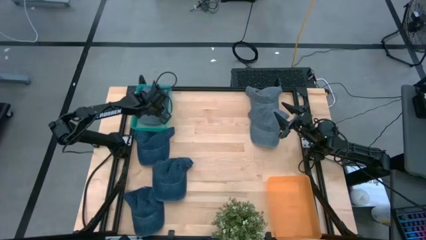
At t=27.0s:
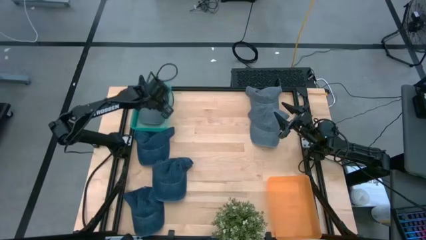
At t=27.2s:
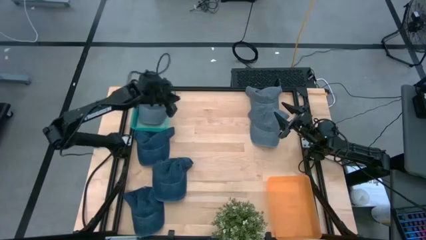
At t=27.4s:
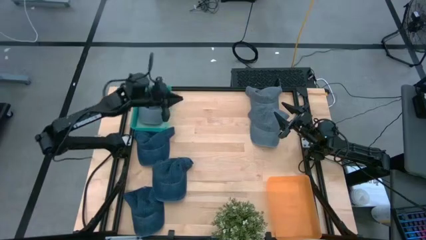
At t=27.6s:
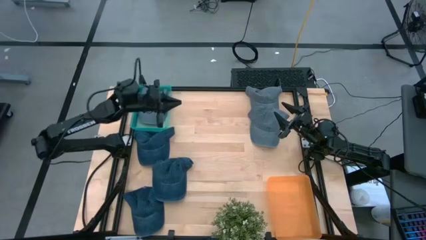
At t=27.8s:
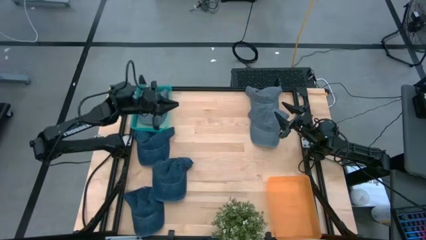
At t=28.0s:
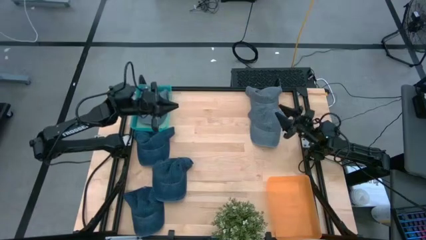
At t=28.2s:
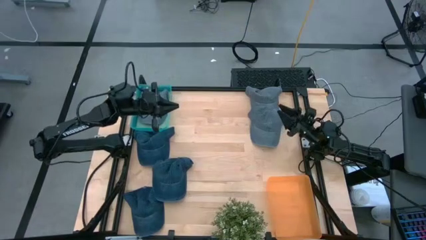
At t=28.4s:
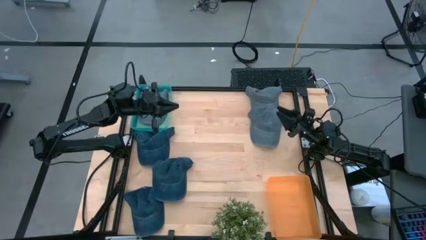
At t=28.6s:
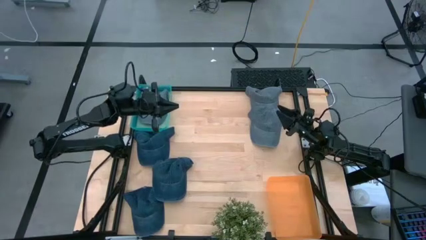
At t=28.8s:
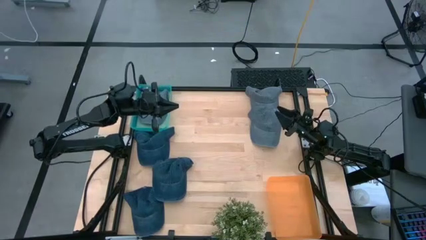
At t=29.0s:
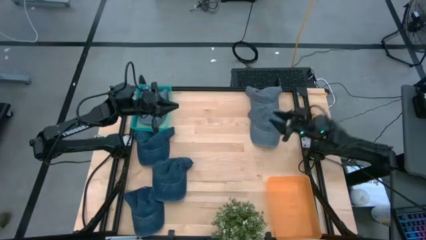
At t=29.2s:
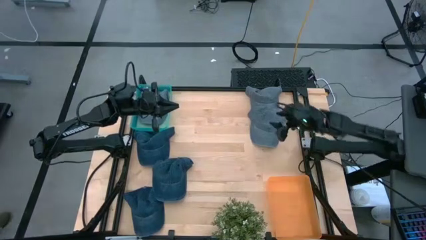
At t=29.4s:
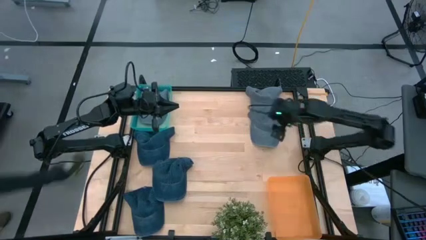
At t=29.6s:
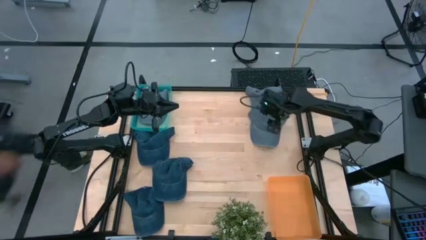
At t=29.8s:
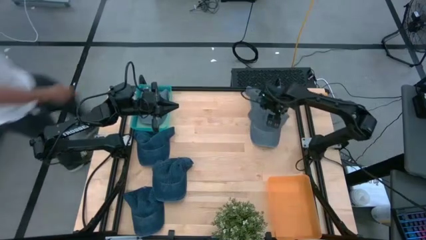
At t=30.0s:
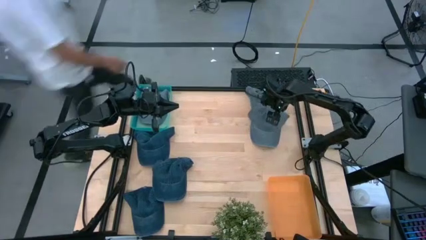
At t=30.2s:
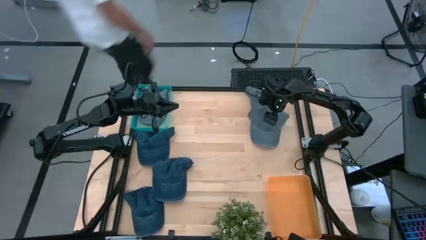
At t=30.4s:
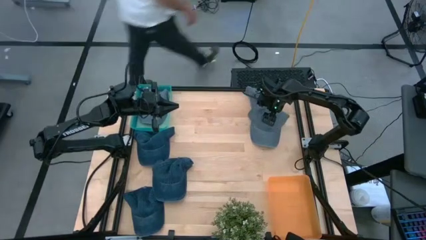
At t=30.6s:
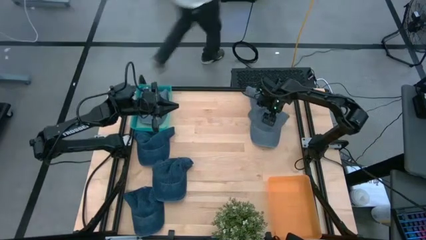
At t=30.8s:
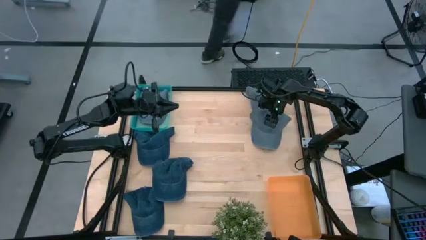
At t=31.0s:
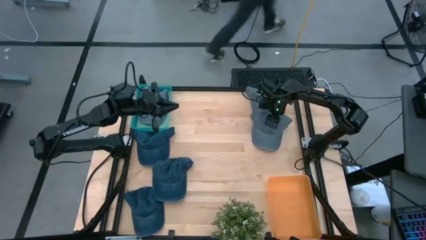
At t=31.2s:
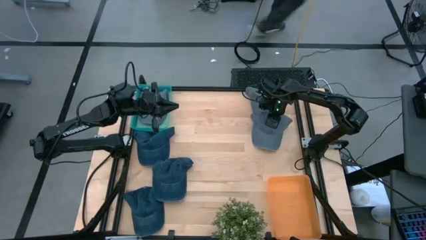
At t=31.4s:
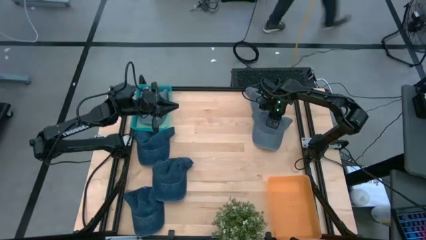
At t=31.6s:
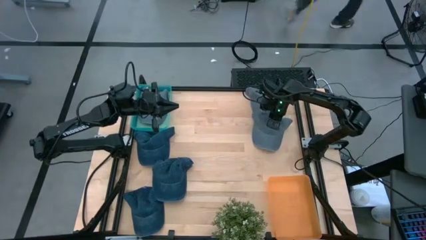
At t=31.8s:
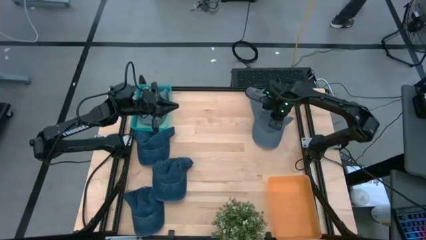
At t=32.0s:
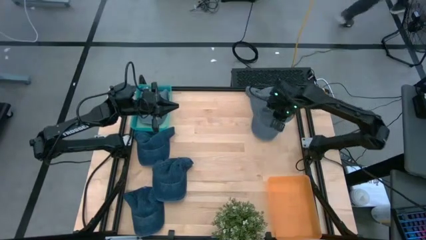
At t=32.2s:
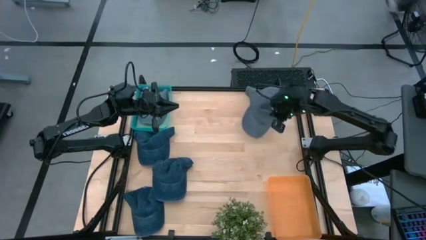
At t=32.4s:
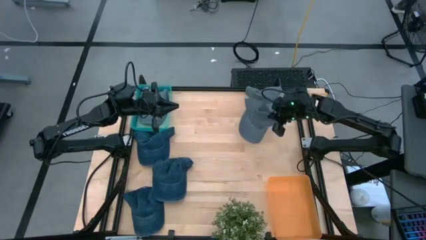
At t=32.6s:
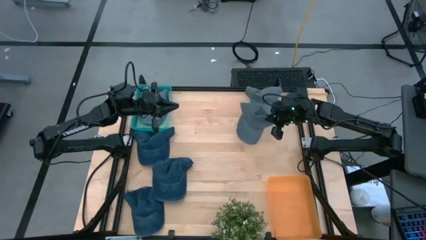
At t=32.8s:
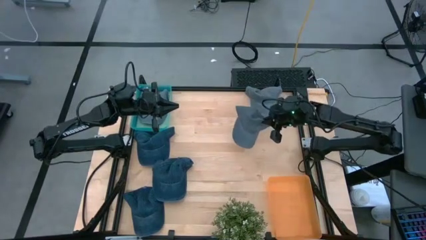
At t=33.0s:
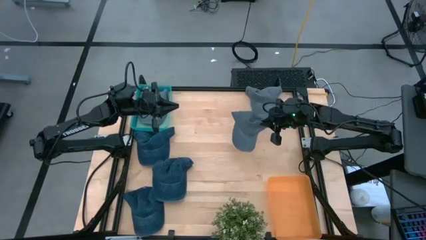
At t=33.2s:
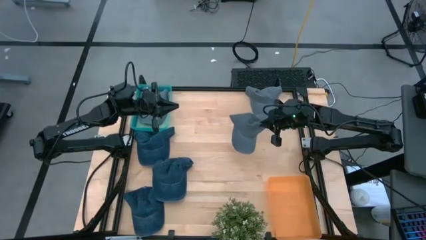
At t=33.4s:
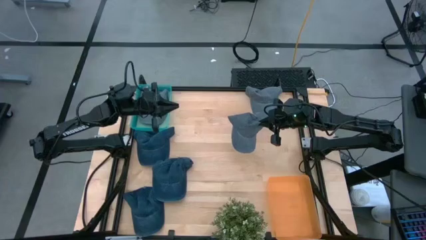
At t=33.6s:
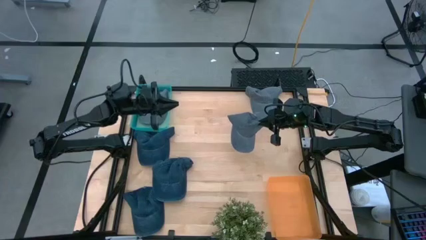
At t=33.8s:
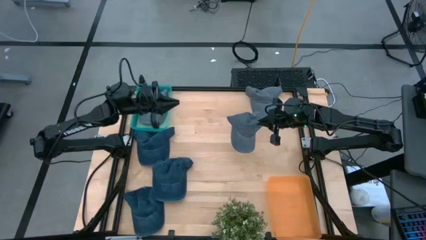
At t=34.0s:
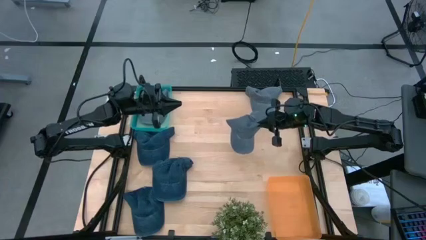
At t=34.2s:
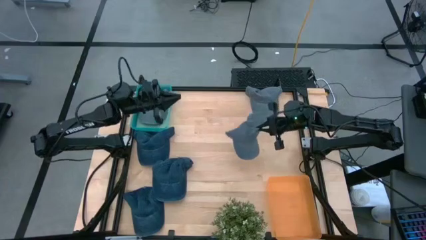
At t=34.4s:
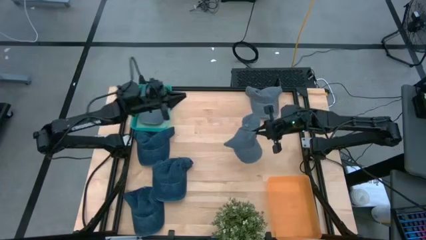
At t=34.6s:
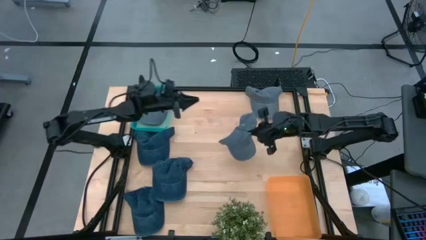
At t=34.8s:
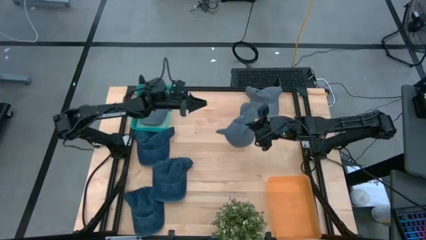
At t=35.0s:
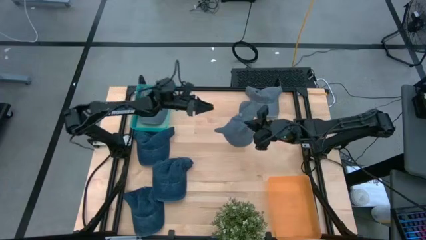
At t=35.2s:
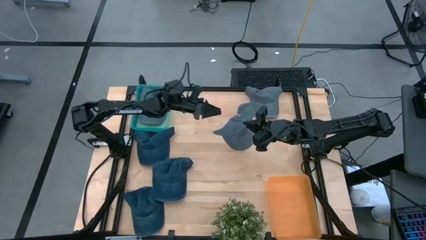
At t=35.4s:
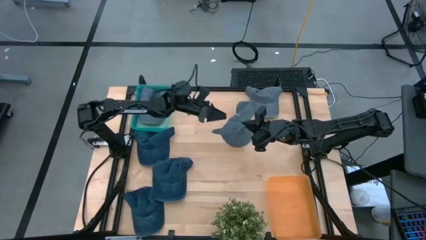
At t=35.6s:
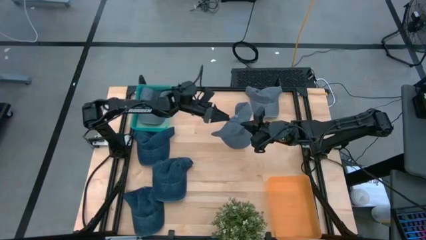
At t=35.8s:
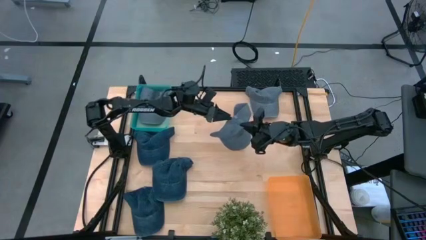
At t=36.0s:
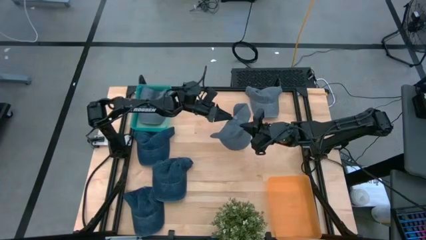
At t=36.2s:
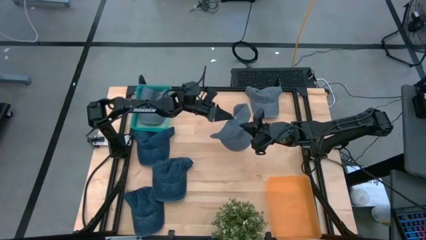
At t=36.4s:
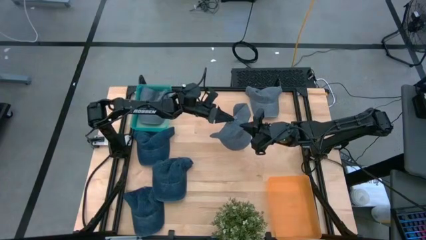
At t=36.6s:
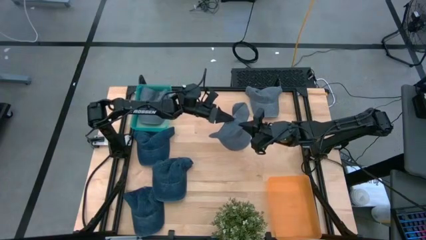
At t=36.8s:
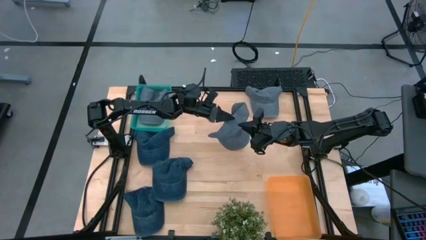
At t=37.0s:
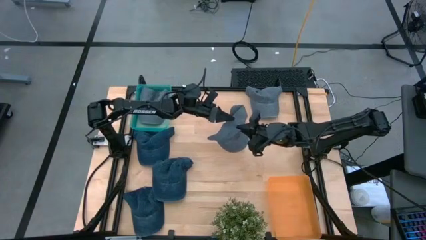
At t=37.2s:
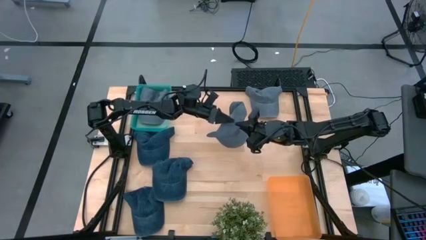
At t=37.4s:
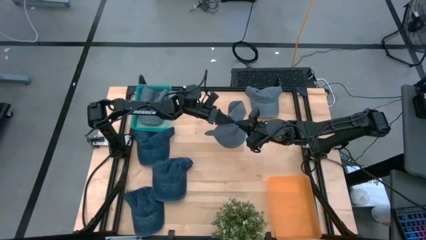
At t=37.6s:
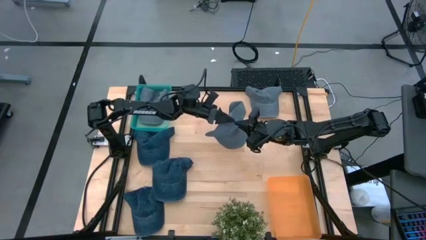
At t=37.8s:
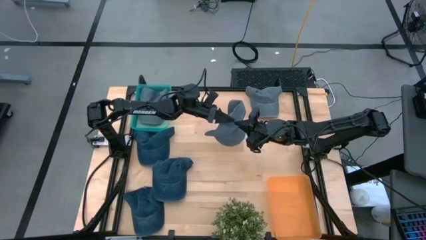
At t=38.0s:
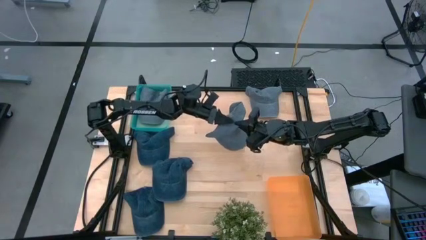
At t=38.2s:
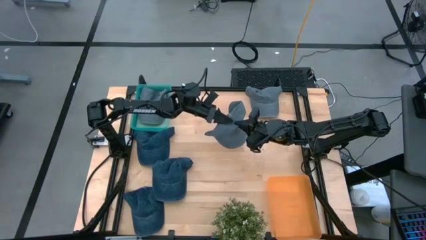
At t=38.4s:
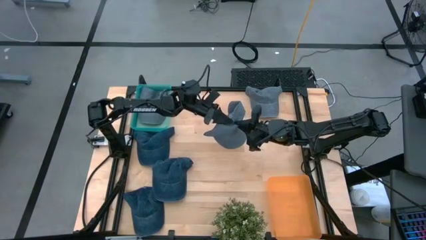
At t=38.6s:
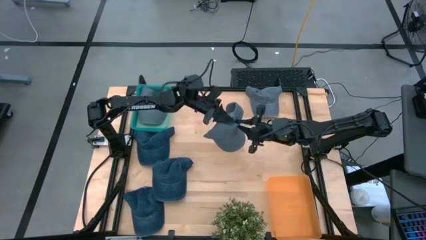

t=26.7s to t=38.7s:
Task: Pick & Place hat
Put the bottom gray cap into the green bin
